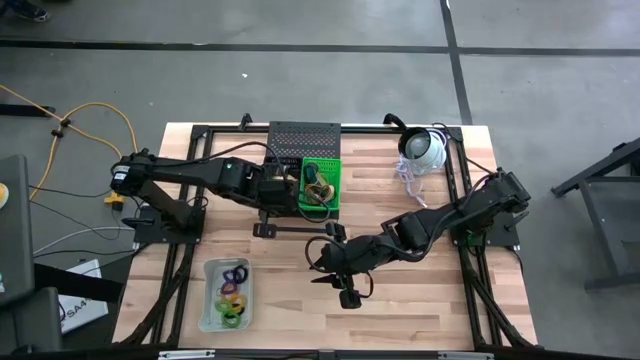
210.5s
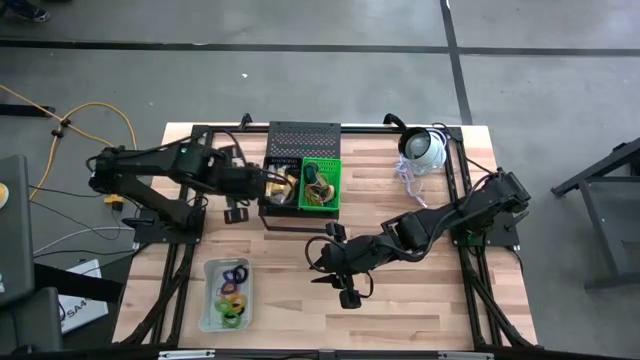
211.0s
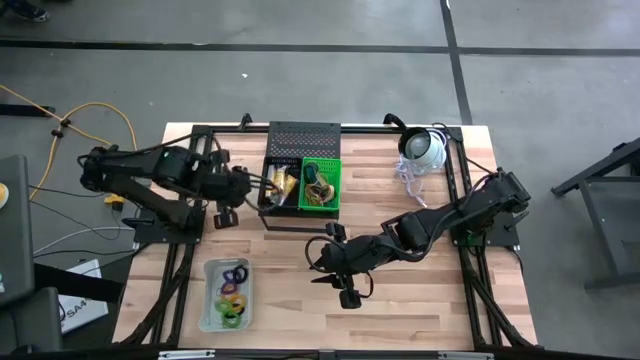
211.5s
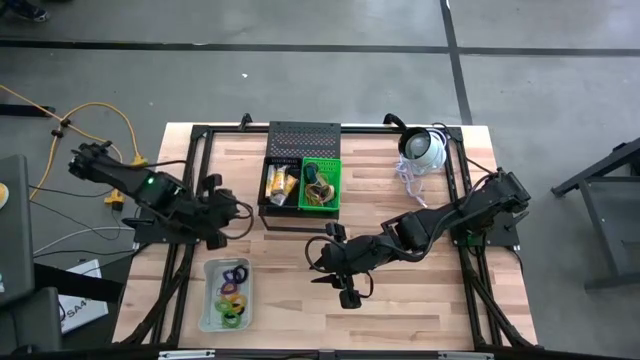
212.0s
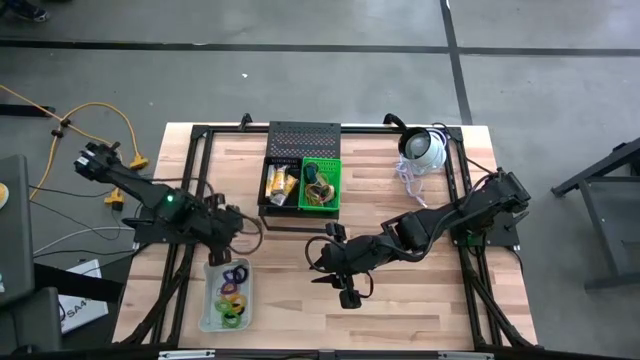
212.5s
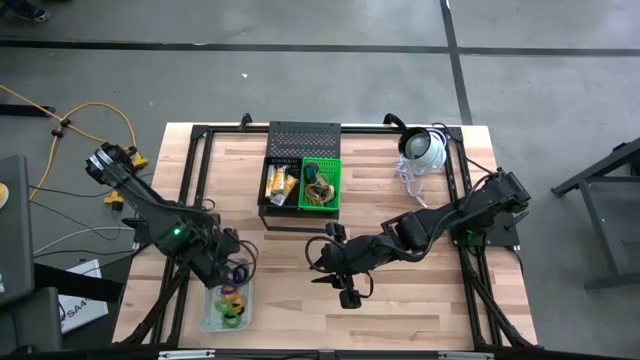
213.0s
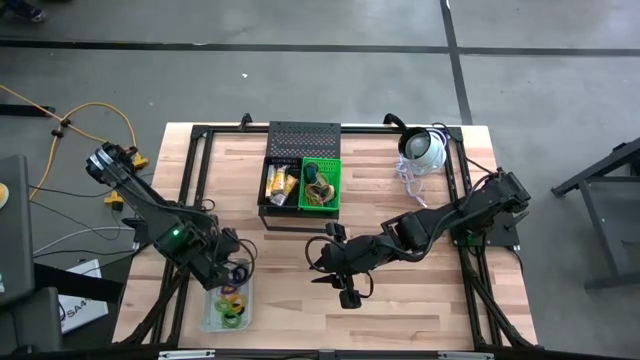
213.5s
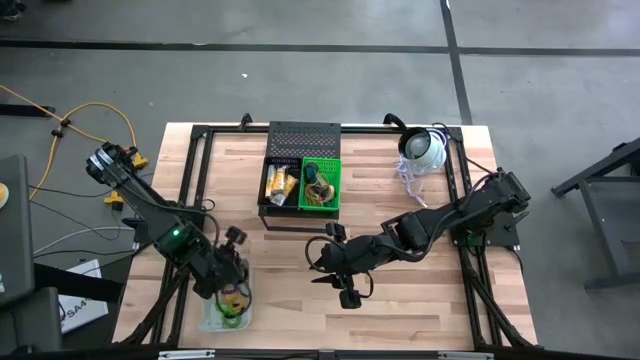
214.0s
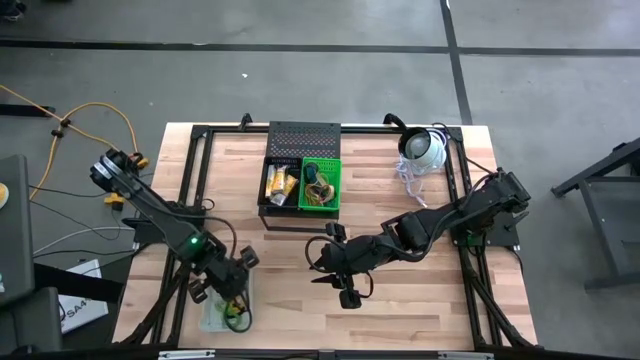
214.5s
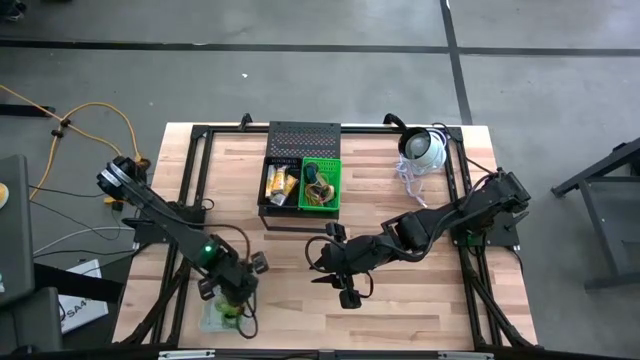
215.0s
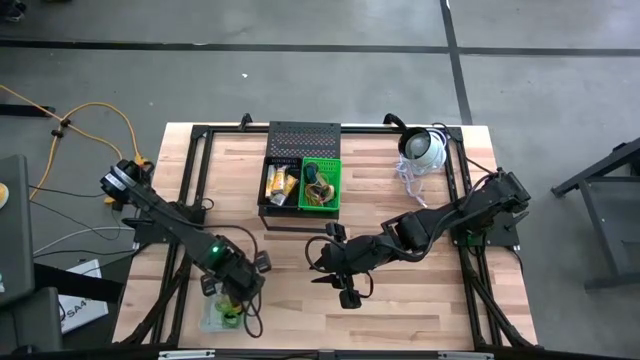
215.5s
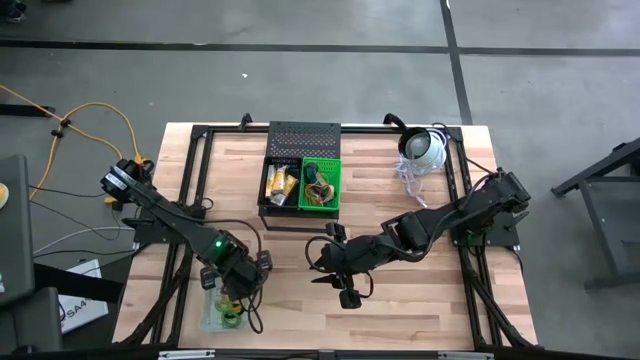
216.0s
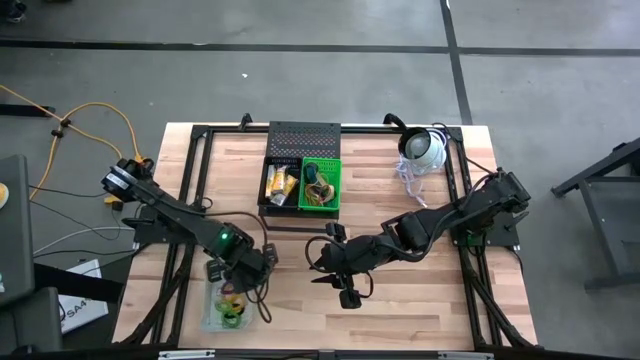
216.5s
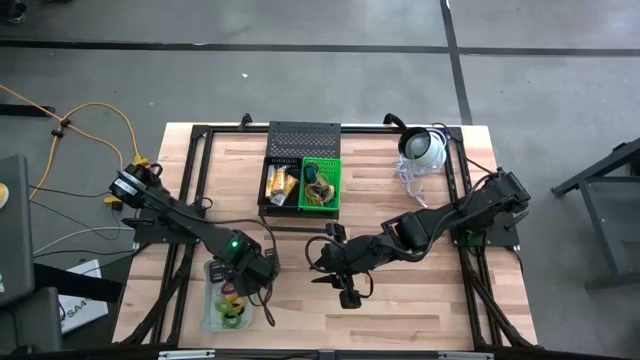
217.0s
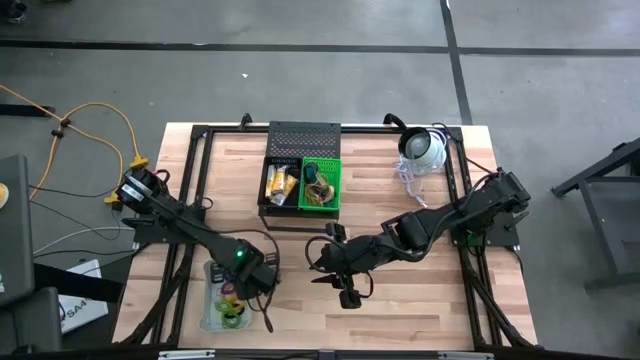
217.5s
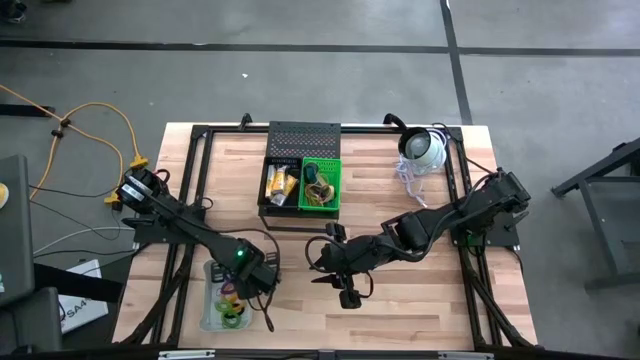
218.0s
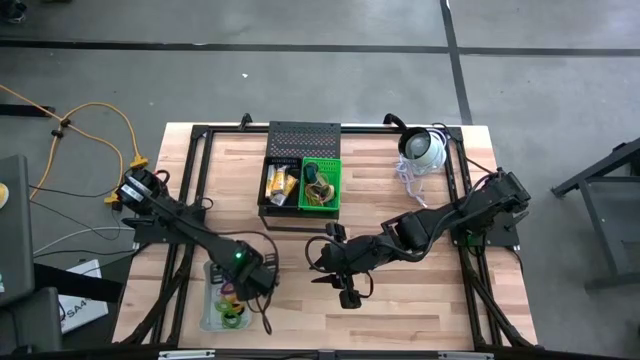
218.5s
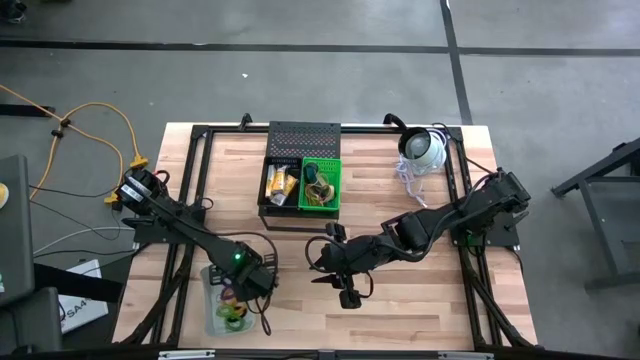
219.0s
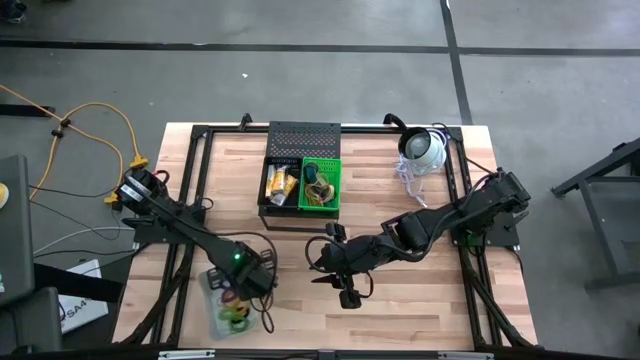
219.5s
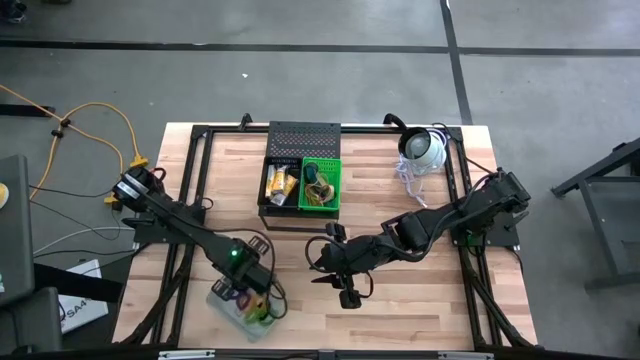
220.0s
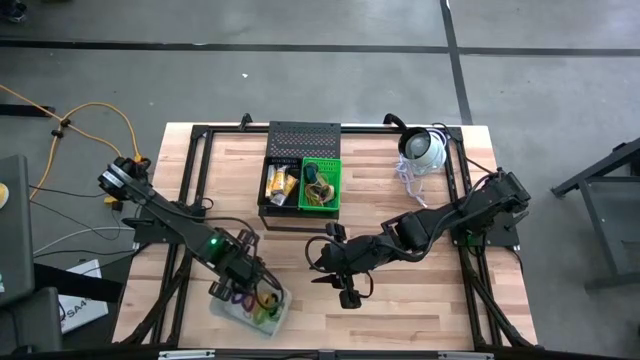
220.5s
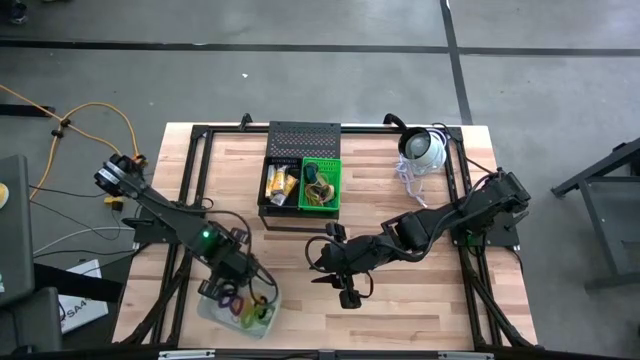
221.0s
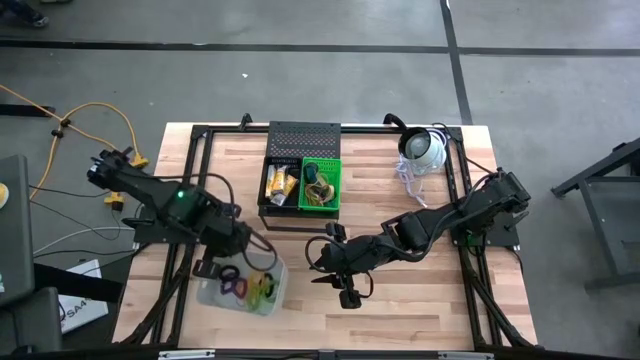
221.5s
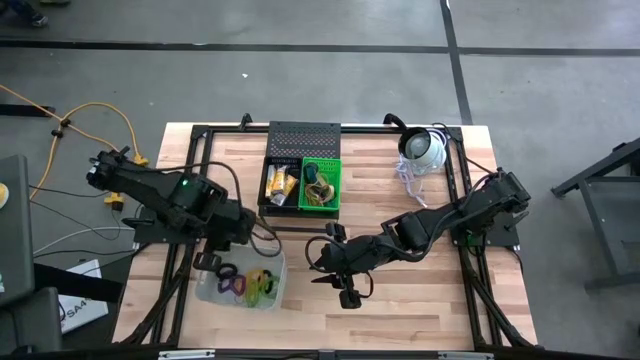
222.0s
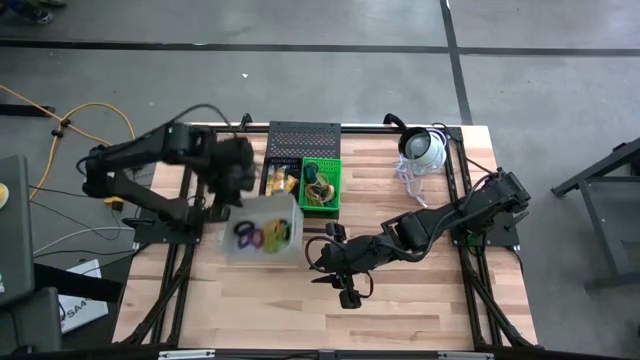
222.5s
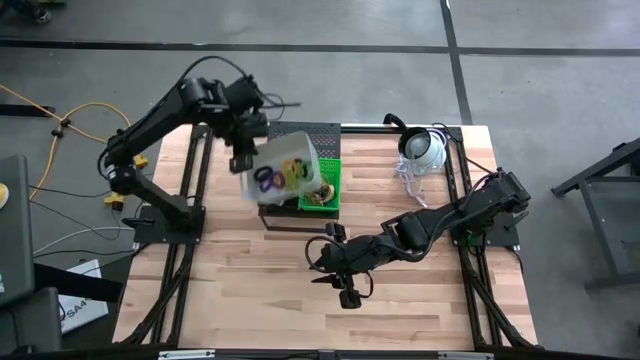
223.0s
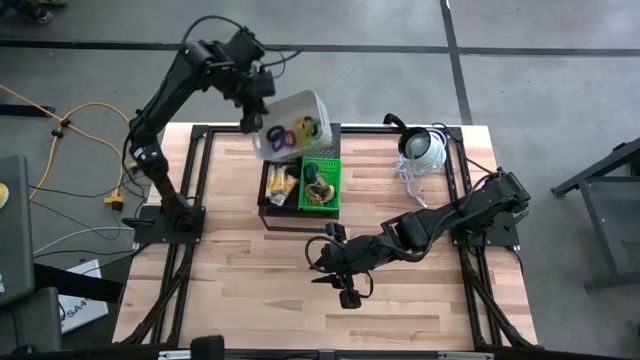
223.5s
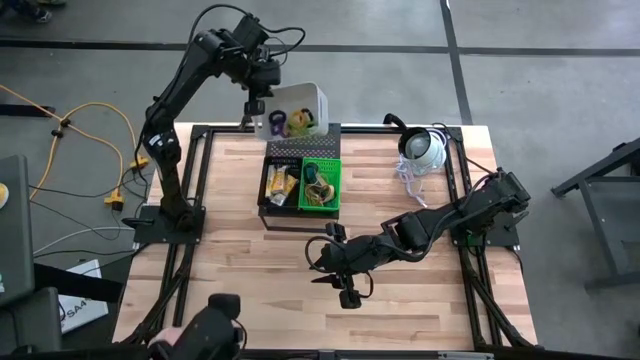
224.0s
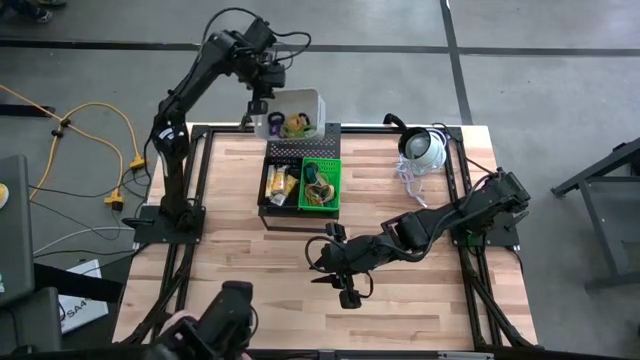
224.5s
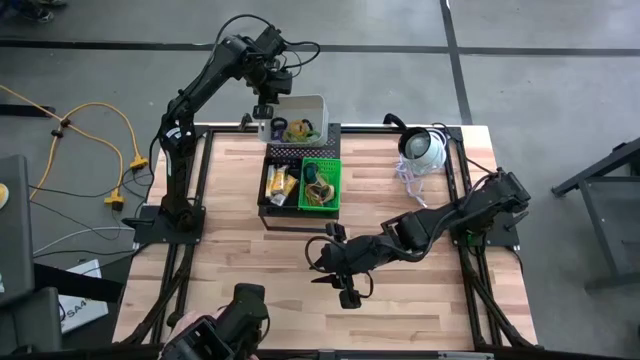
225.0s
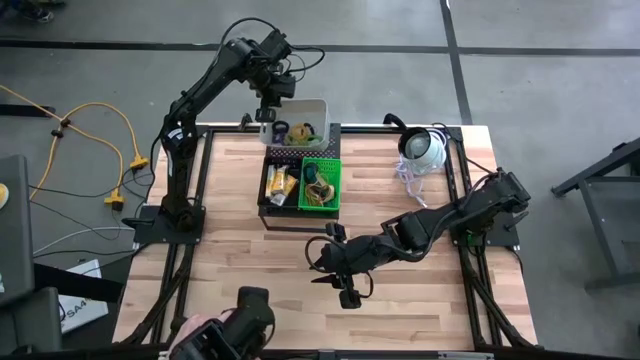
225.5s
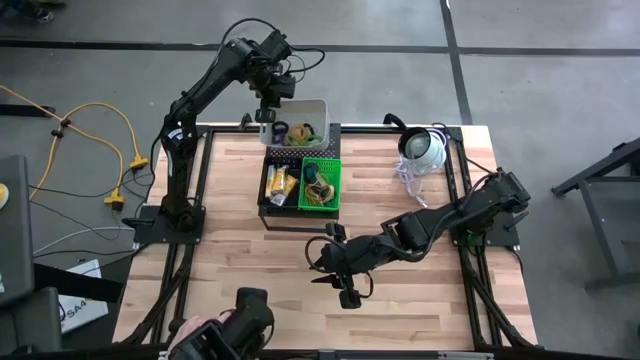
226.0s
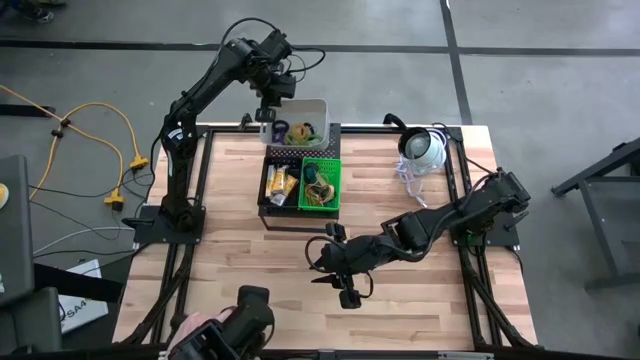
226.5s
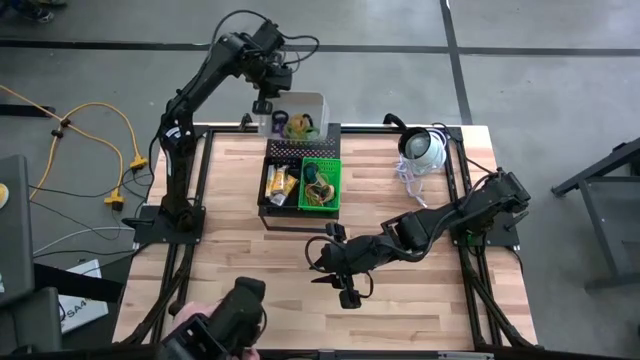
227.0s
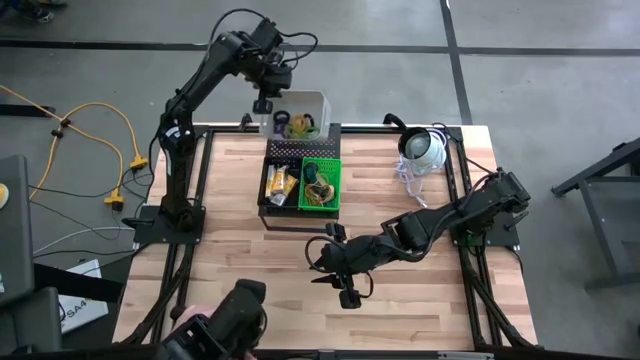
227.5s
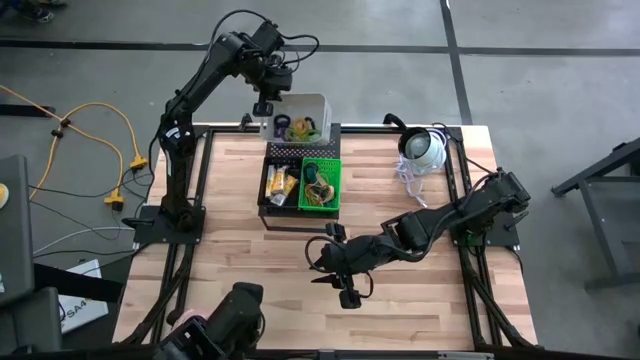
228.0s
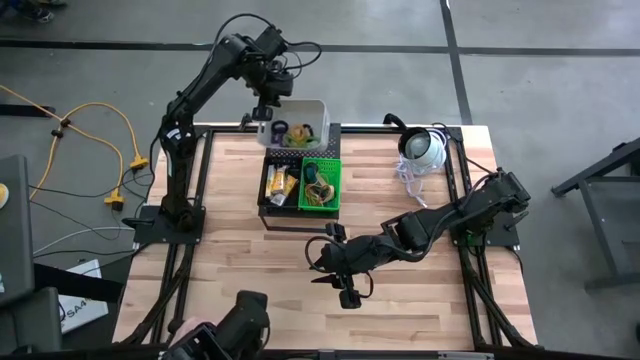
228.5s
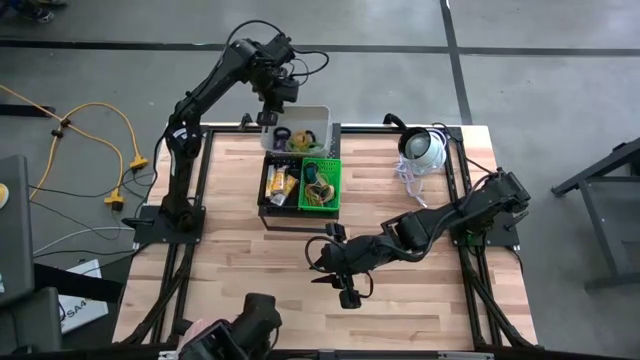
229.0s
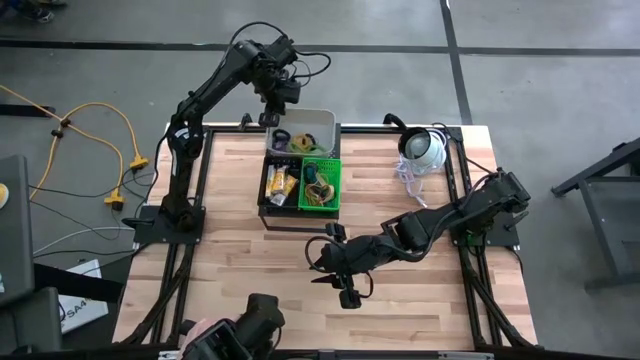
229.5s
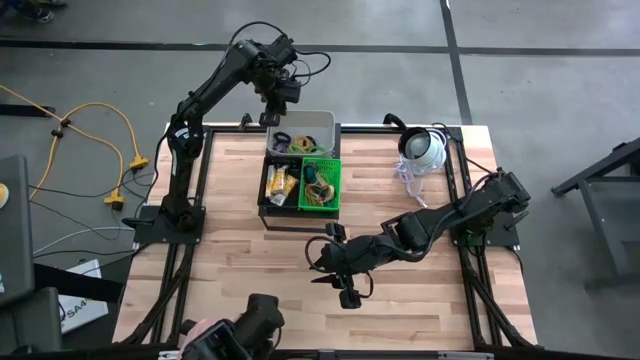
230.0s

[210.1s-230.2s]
Task: Pick & Place Office Desk Supplies
Put the gray bin with spring keychains on the shelf

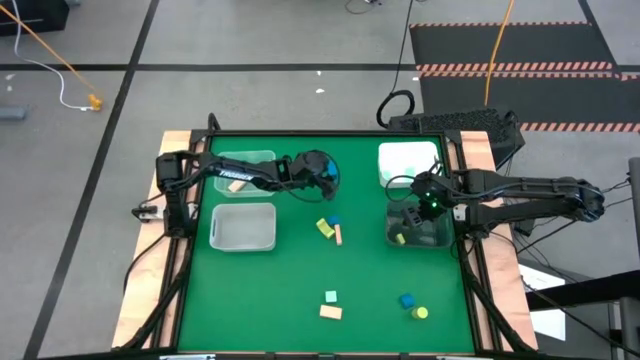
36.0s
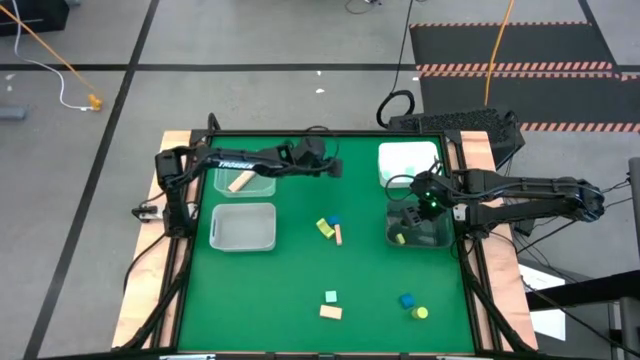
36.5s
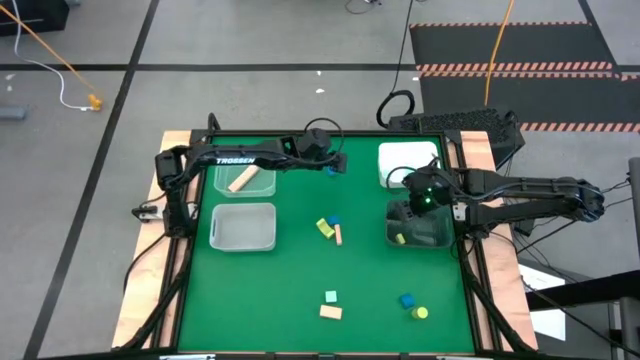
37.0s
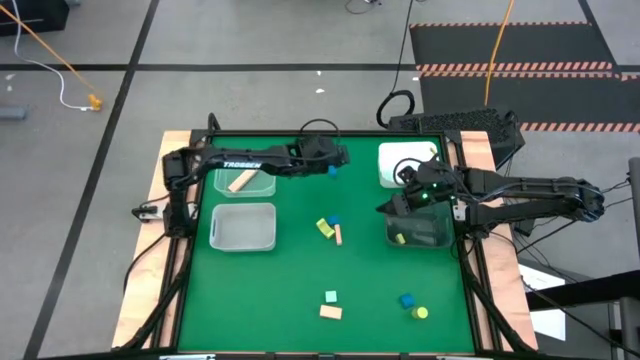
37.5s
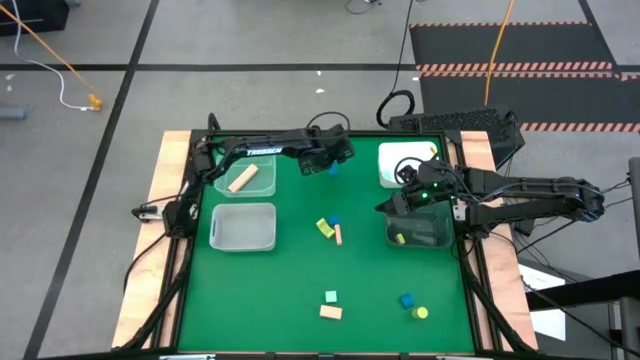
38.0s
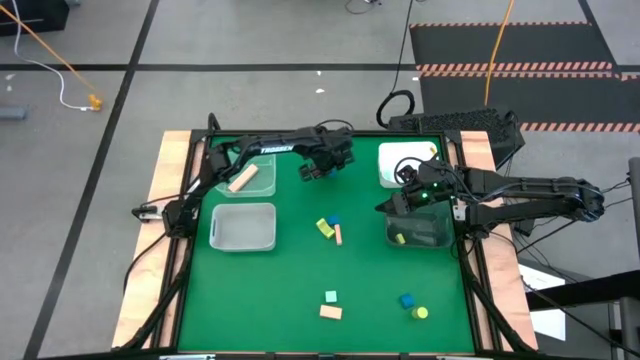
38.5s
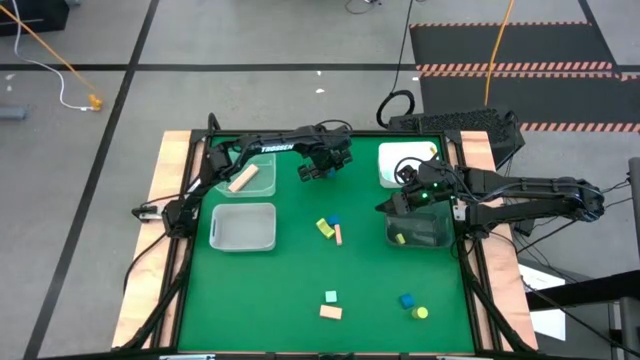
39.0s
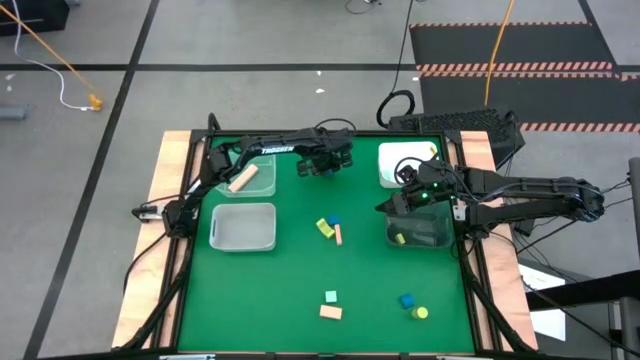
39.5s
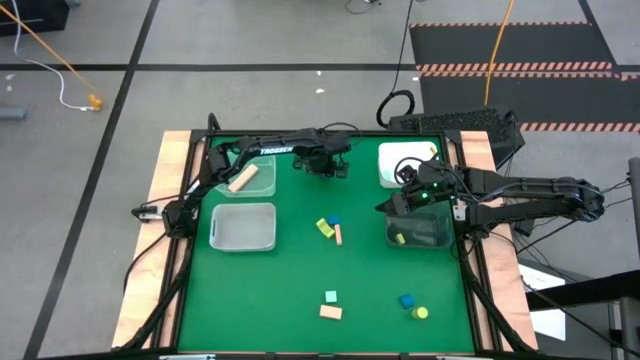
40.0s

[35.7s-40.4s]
Task: Sort & place blocks by color
Put the top blue block into the gray bin
